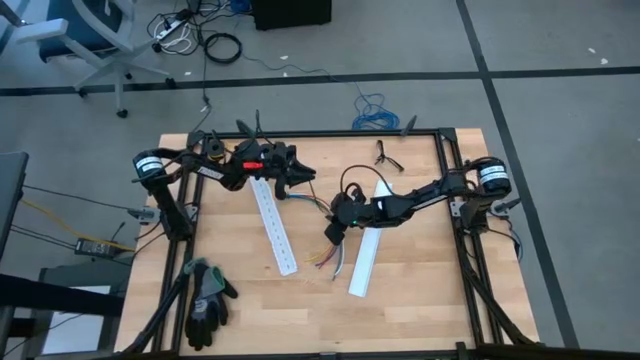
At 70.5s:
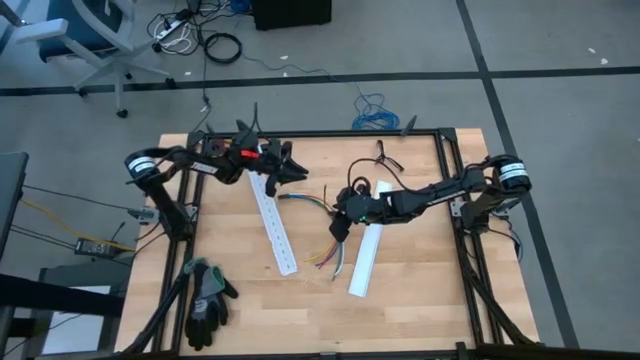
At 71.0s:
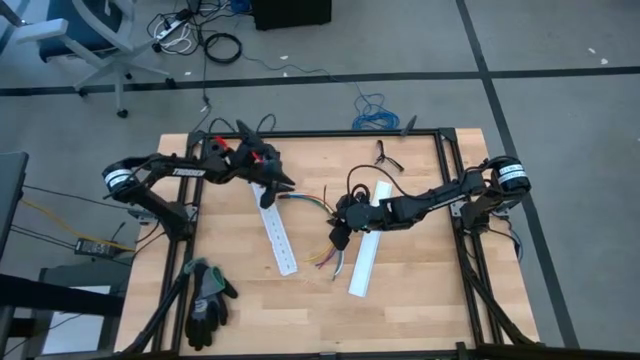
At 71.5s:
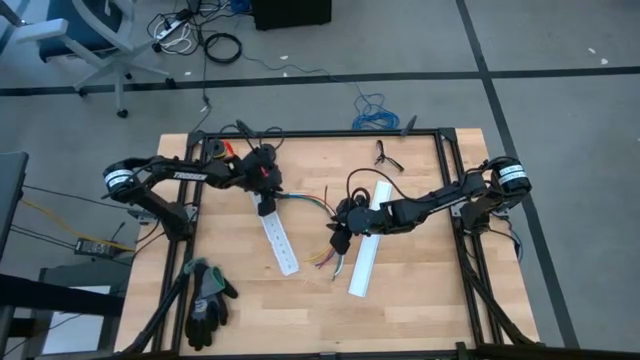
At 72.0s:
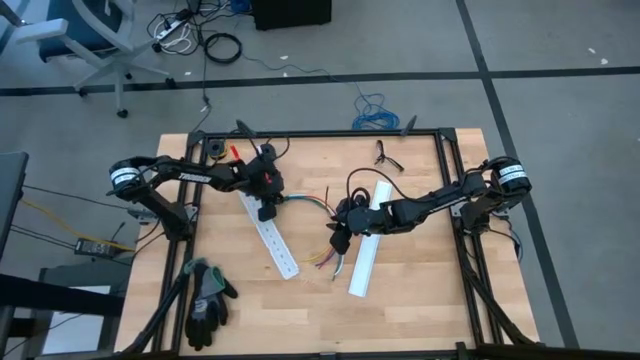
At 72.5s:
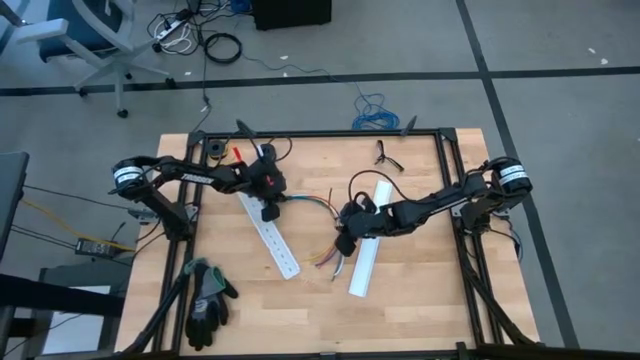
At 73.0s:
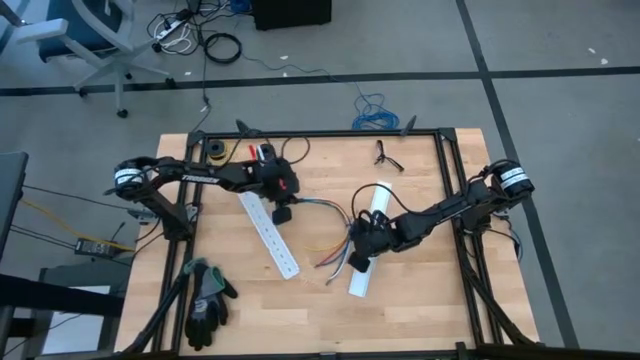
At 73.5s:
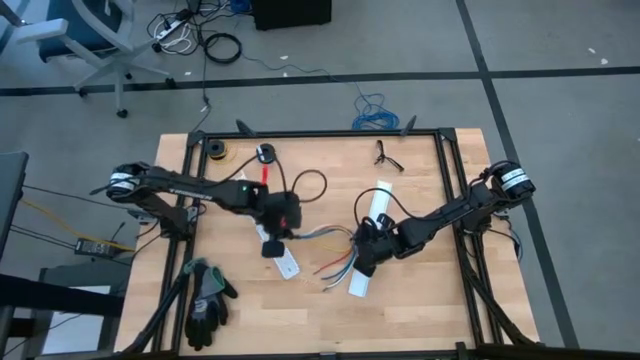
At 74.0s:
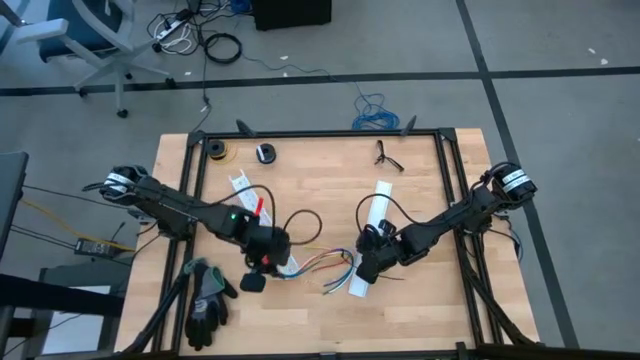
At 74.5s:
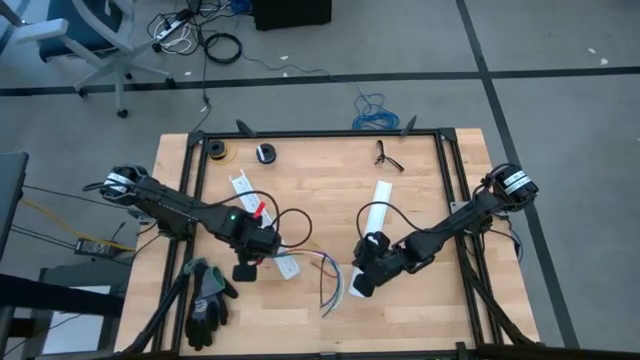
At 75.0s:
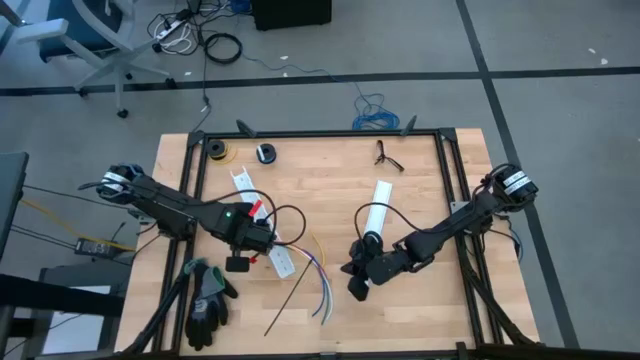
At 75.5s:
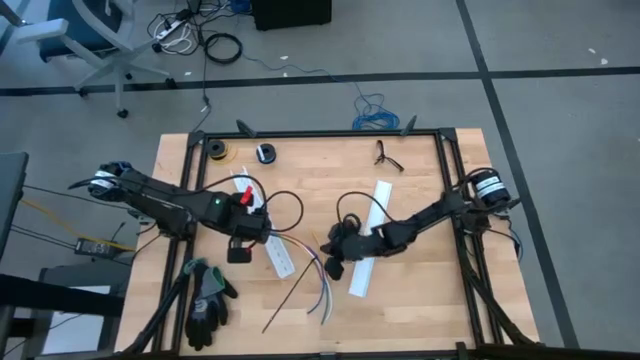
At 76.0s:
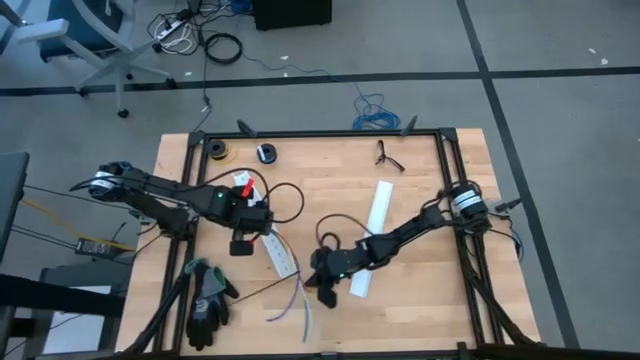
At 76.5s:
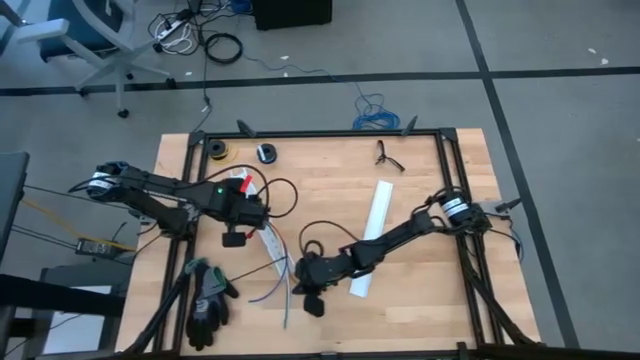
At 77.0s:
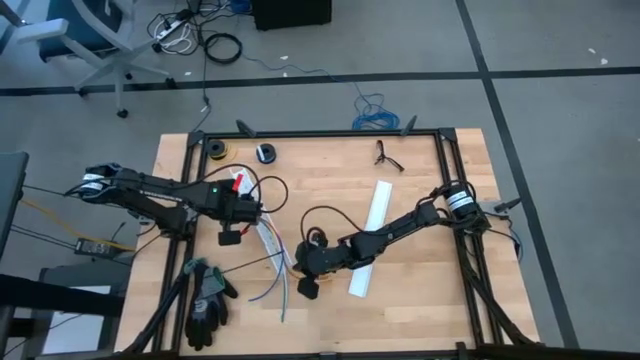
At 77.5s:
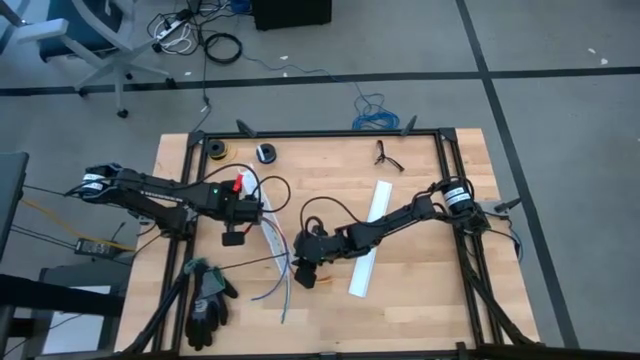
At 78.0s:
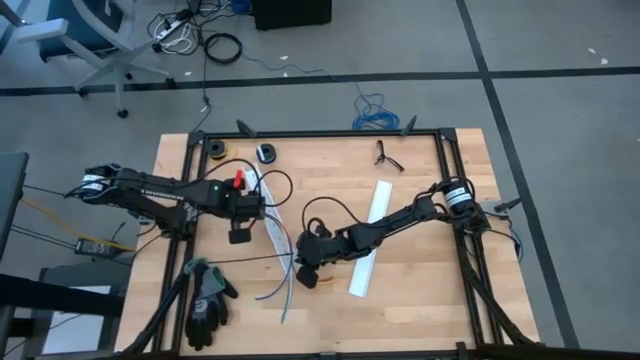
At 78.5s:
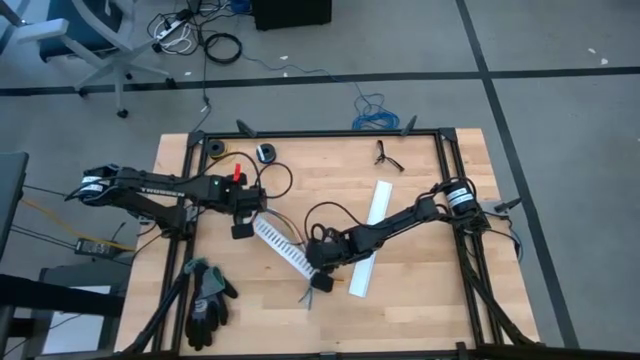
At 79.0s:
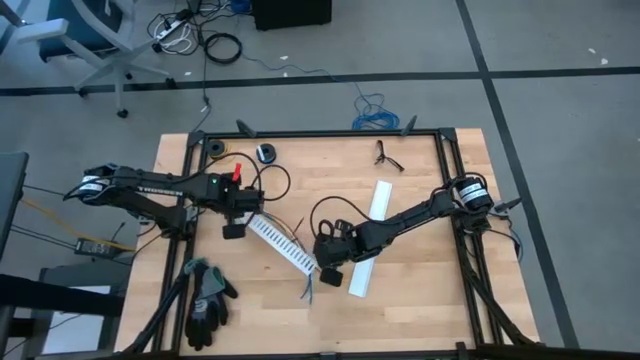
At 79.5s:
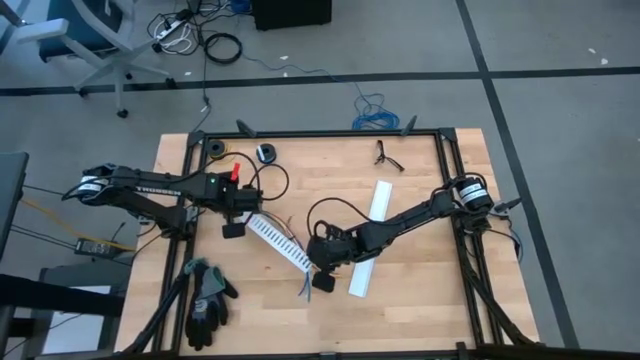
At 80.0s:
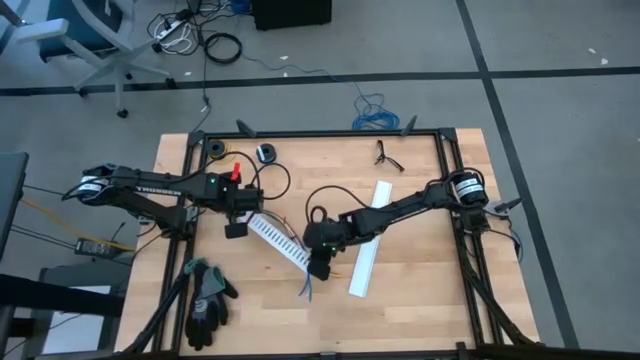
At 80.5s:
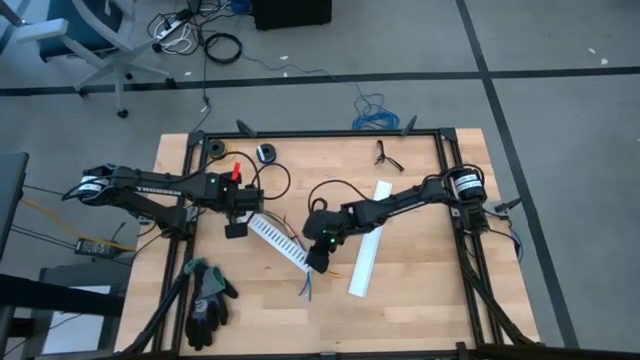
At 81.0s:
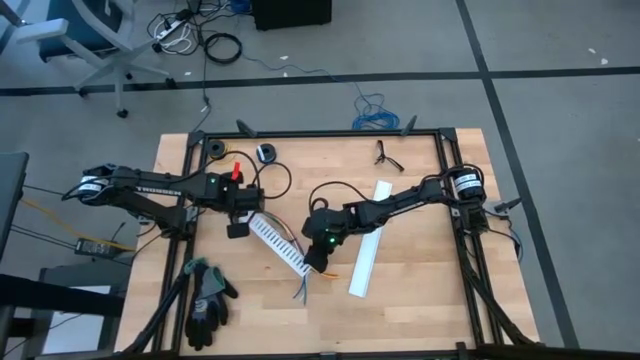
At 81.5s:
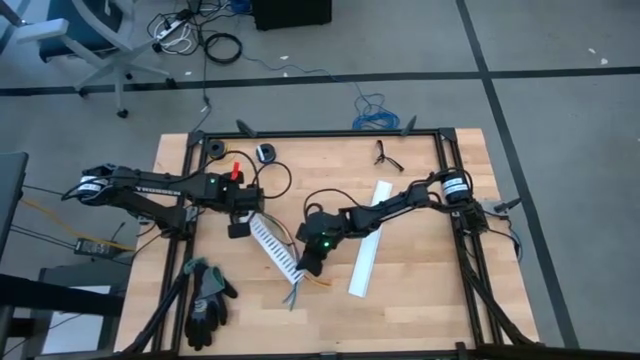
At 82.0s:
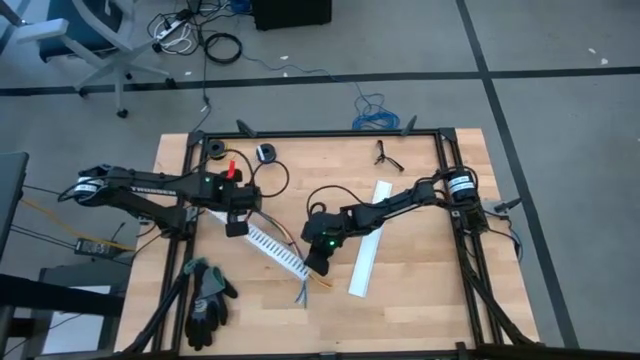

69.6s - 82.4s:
Task: Ziptie cables
Put the ziptied cables into the cable duct

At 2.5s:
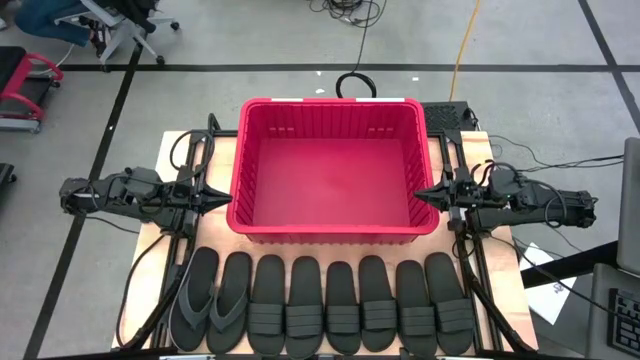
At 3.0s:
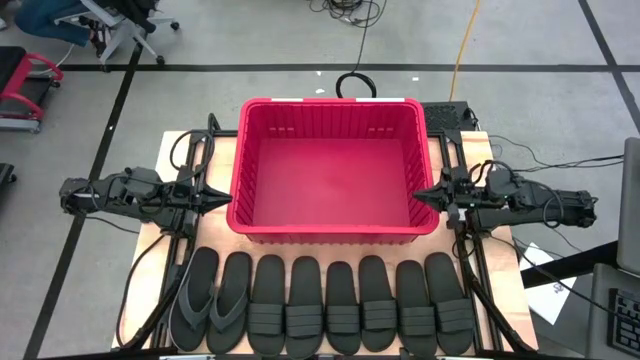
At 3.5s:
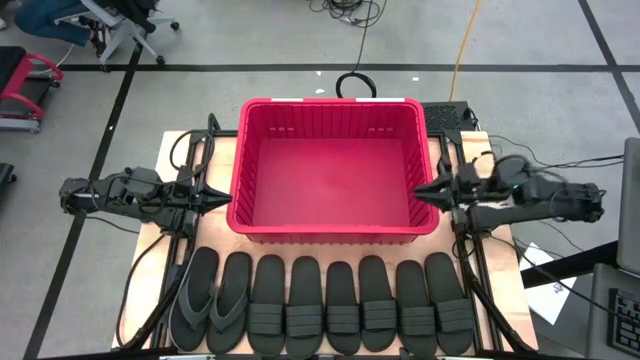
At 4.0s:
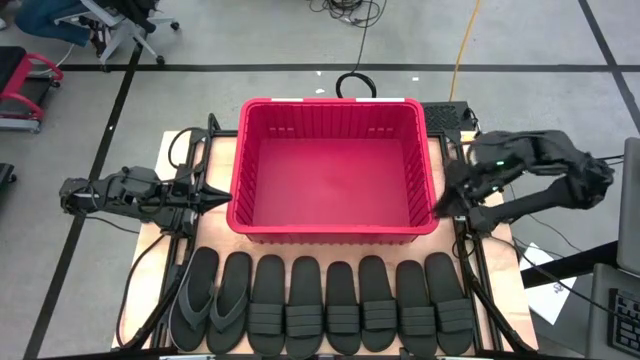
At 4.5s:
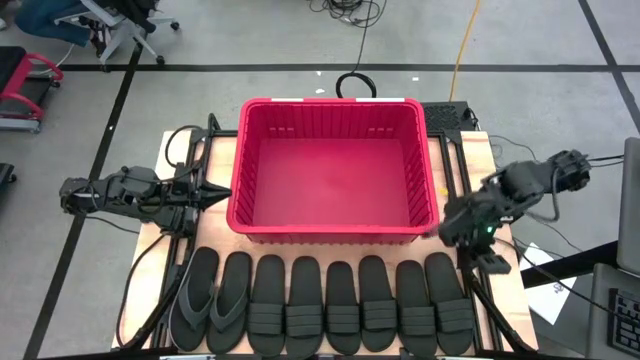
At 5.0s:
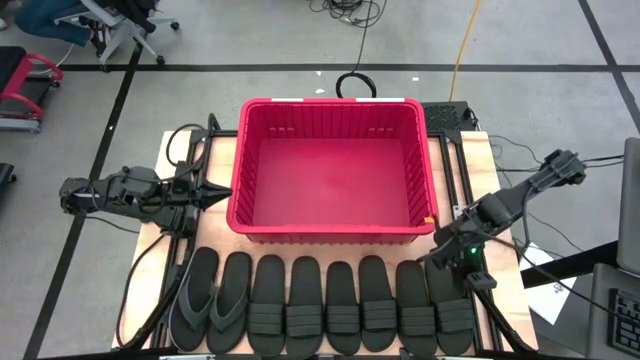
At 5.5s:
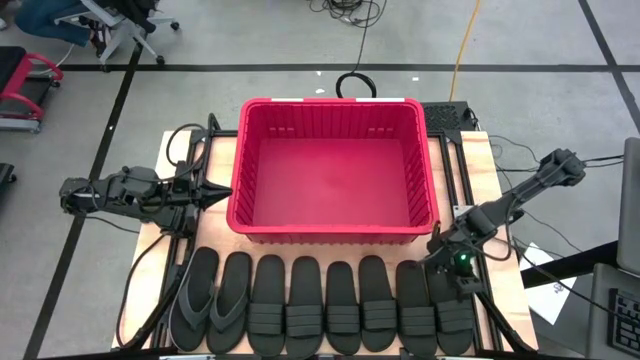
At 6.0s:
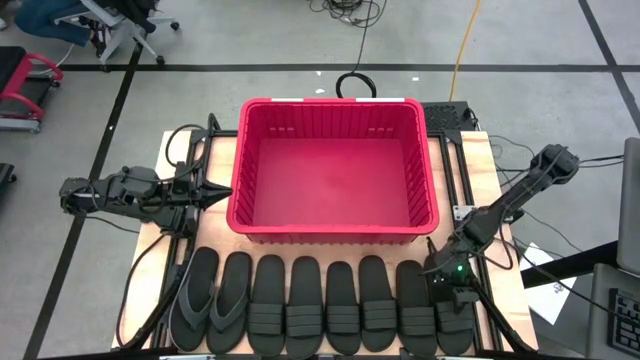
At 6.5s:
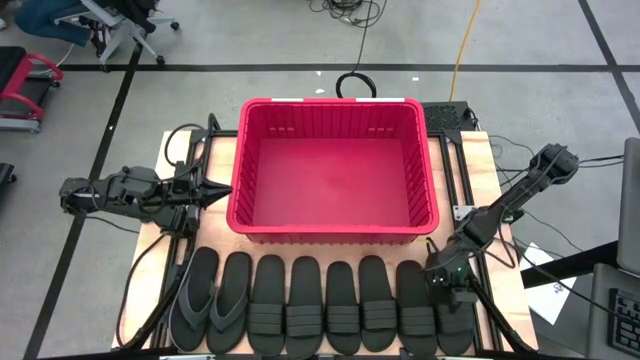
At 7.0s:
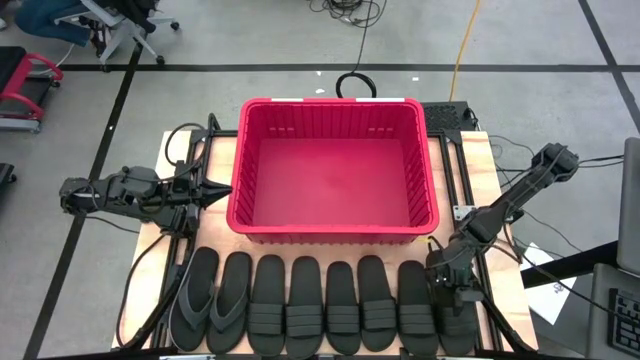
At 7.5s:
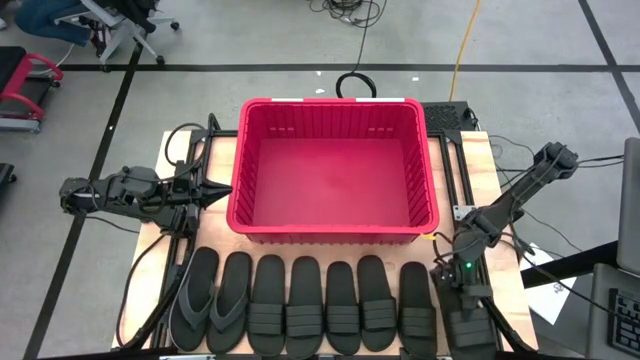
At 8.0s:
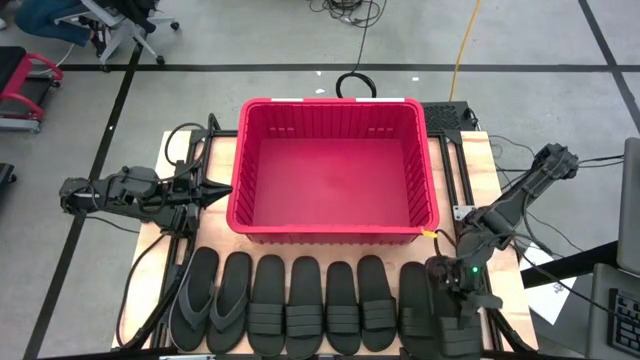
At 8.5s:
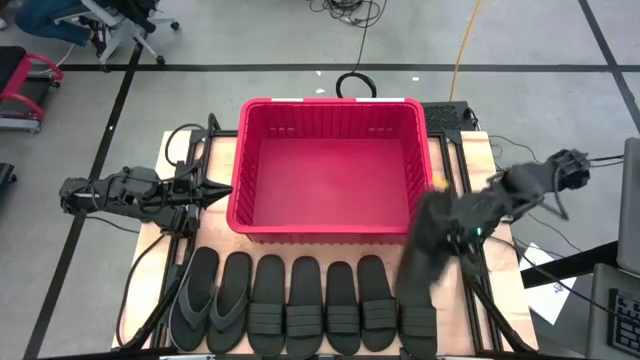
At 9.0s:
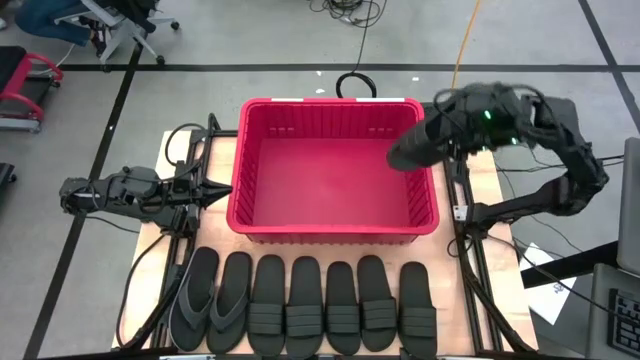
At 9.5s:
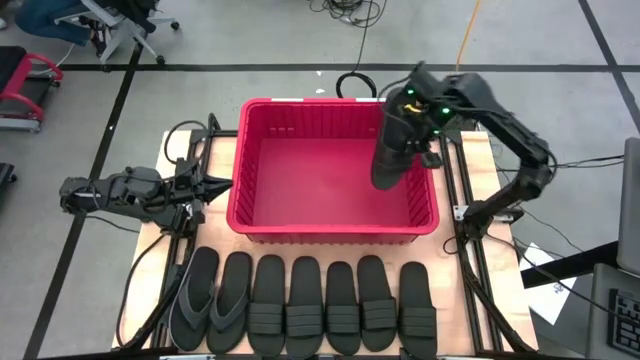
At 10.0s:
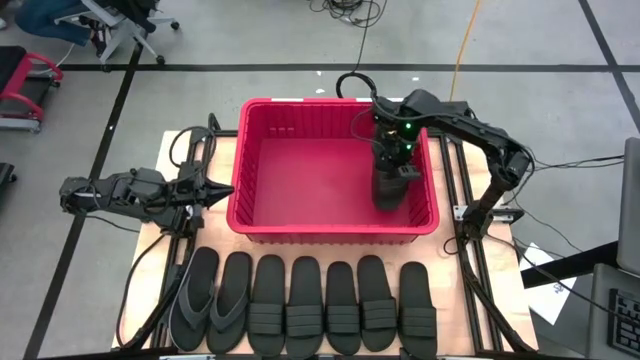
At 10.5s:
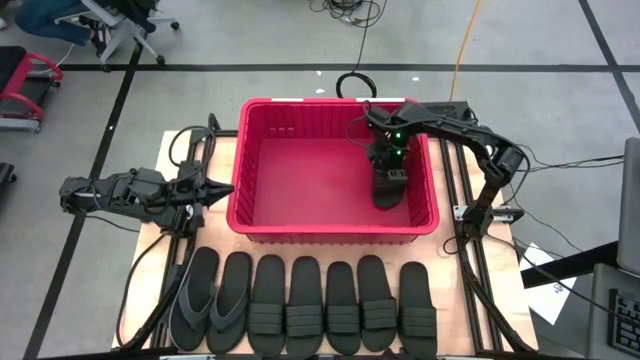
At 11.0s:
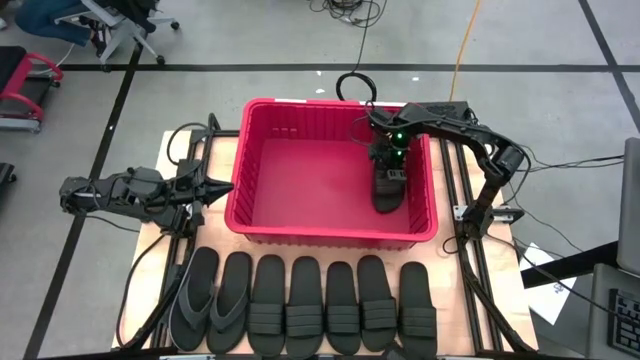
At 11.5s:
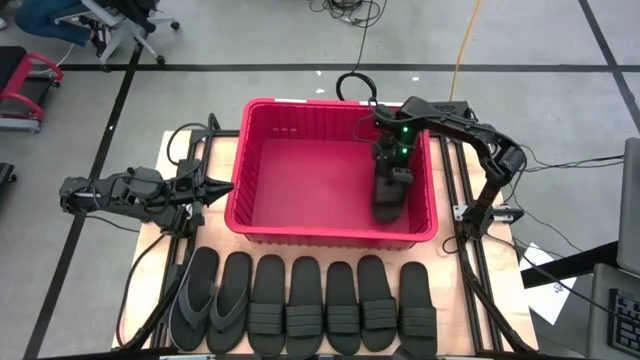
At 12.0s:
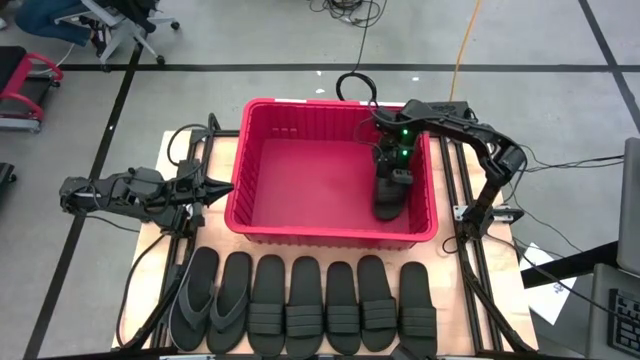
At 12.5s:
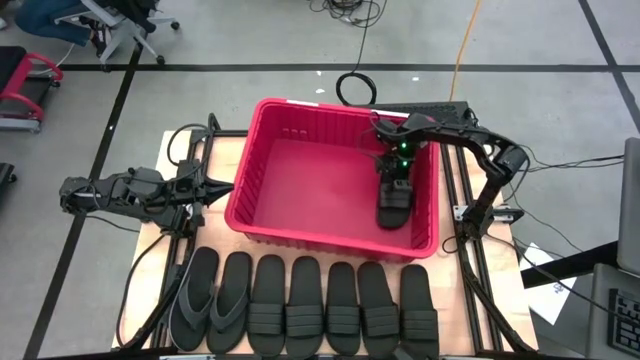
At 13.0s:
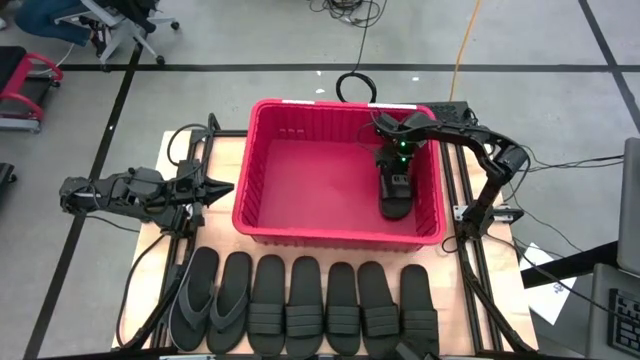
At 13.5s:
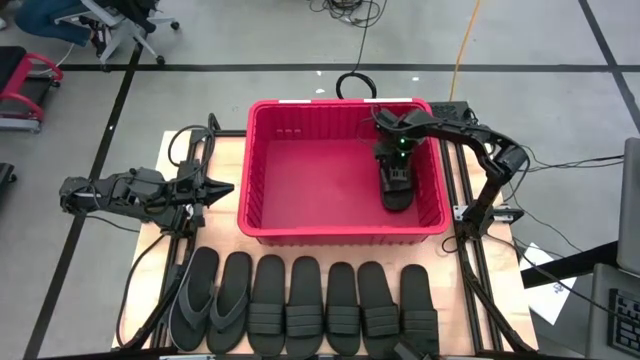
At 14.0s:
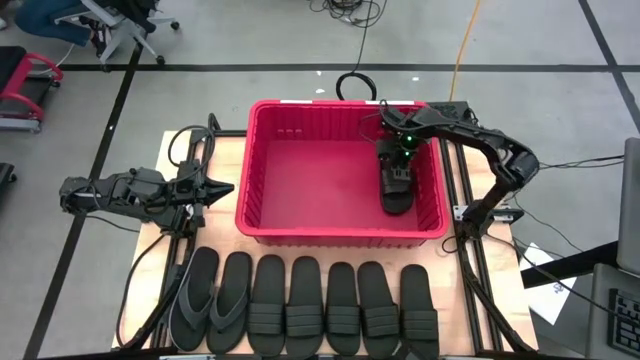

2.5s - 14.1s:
Task: Pick and place slides into bin
Put the black slipper into the red bin
